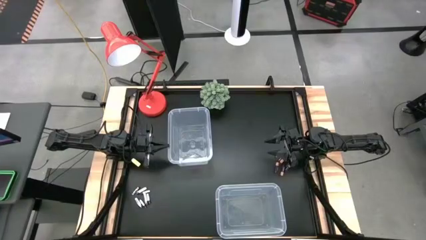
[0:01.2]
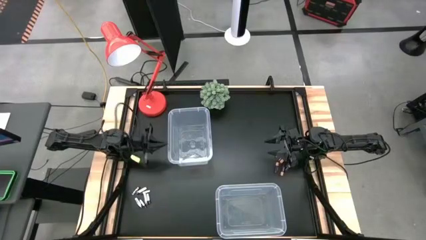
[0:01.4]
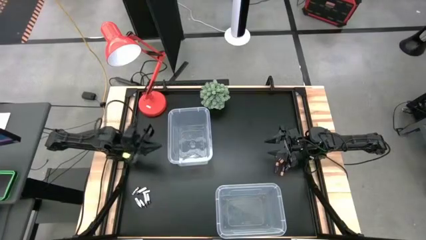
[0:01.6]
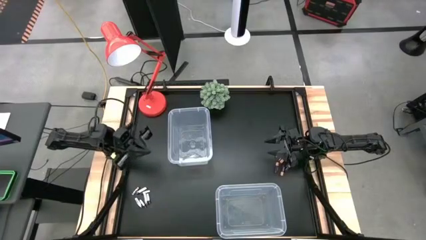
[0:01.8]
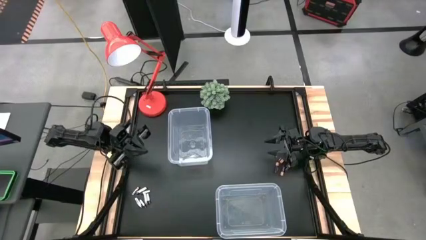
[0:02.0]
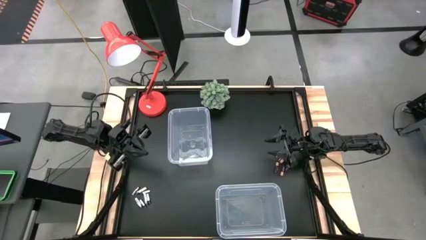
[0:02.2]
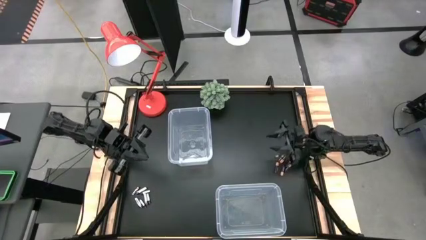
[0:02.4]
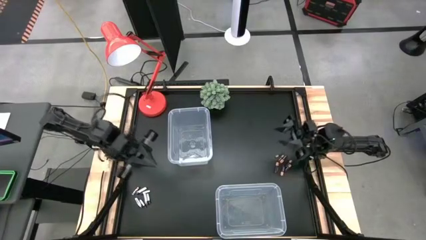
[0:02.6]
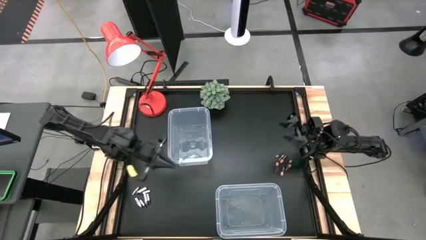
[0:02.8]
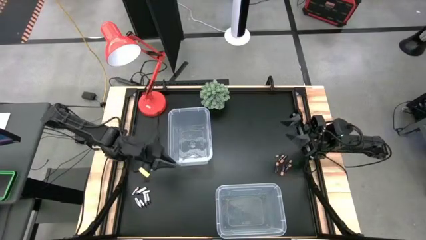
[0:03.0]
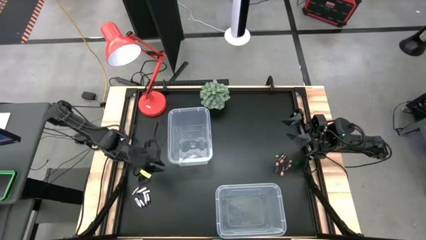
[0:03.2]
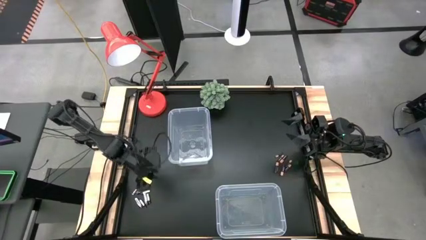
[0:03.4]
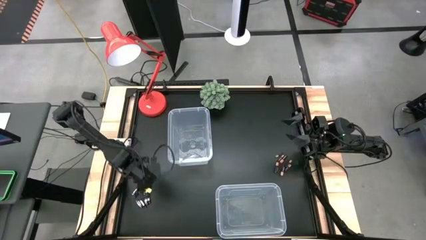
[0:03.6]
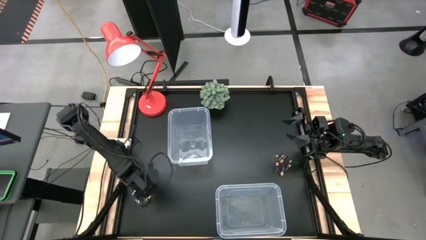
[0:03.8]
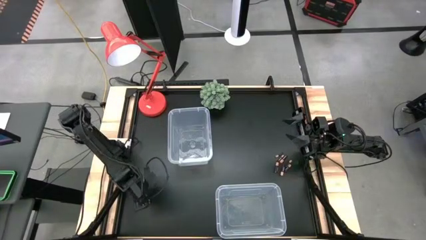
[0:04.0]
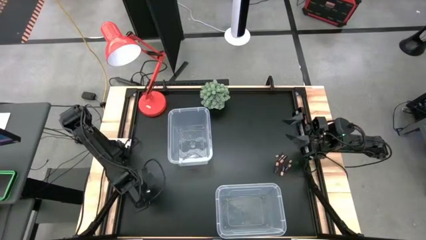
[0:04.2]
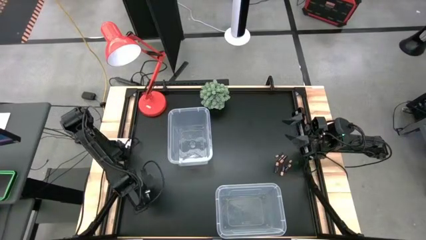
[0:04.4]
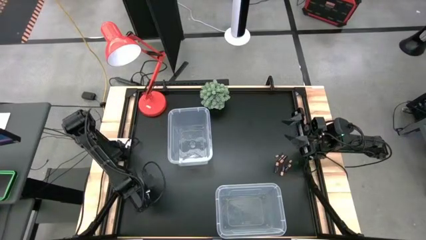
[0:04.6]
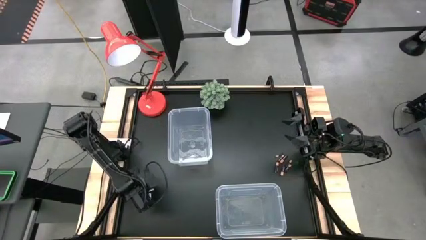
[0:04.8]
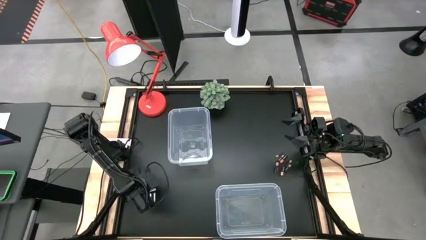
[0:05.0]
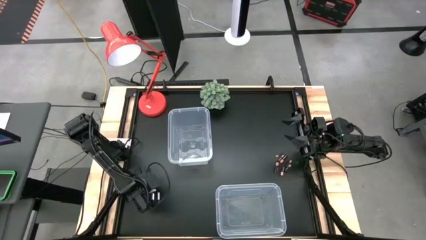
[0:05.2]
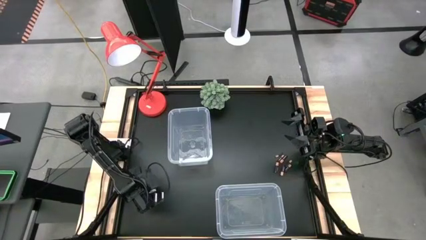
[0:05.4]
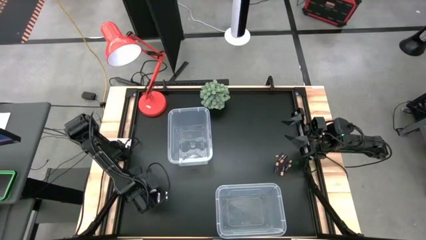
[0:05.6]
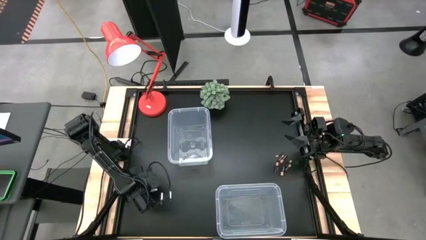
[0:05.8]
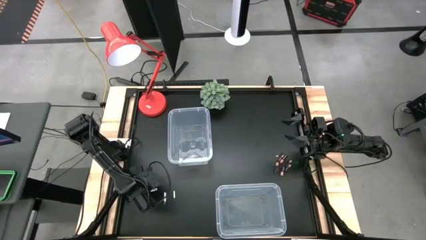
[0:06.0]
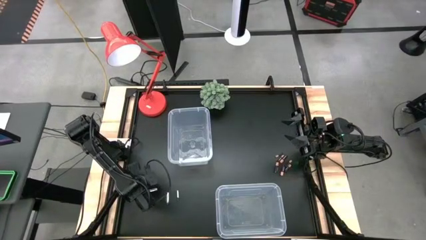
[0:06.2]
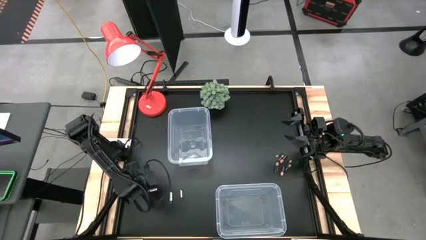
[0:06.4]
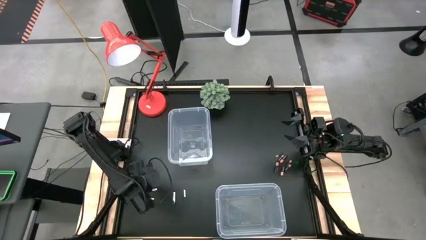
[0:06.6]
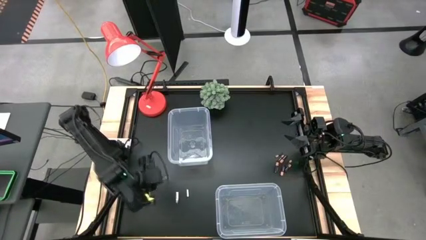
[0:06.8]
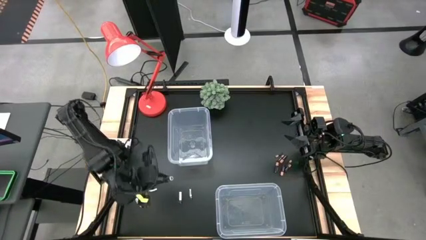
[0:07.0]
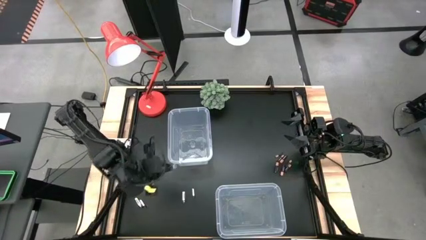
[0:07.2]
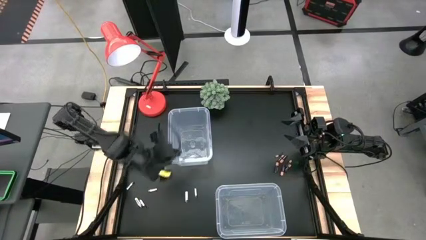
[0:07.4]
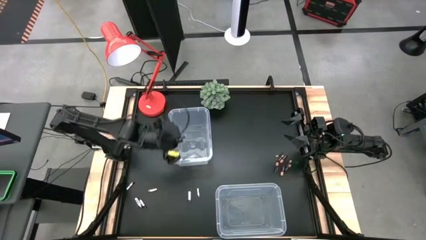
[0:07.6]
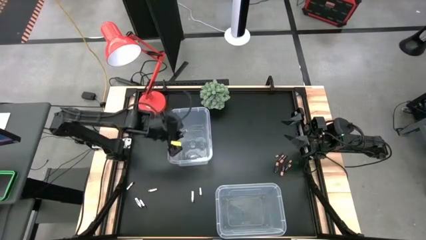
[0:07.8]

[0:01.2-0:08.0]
Task: Sort batteries
Put the silver battery into the top transparent bin

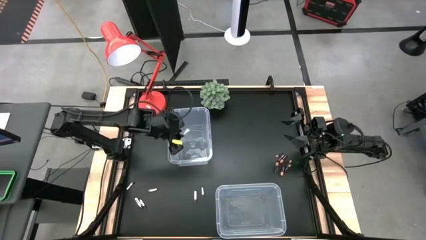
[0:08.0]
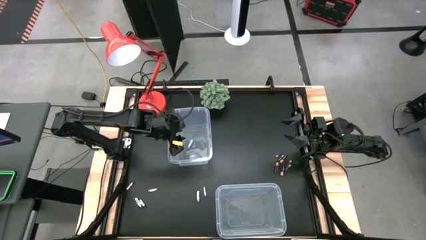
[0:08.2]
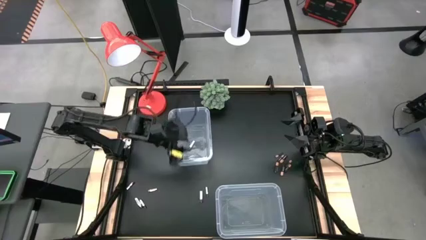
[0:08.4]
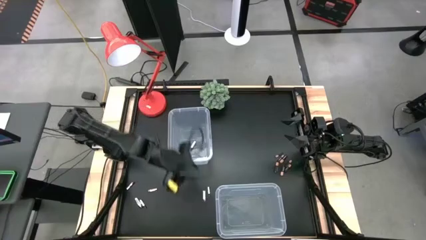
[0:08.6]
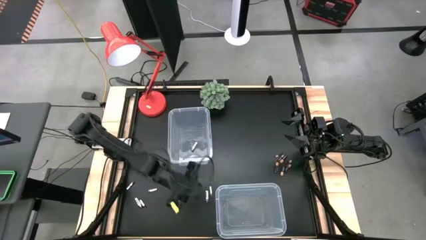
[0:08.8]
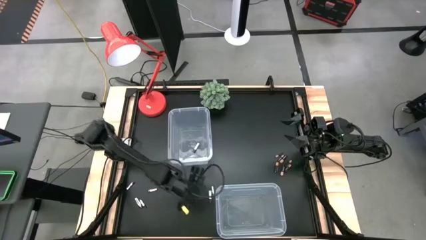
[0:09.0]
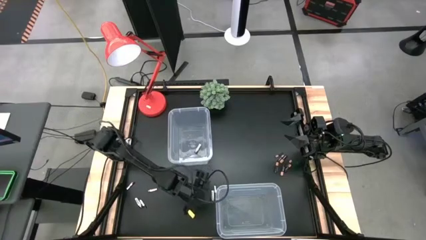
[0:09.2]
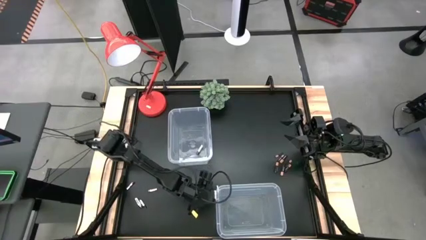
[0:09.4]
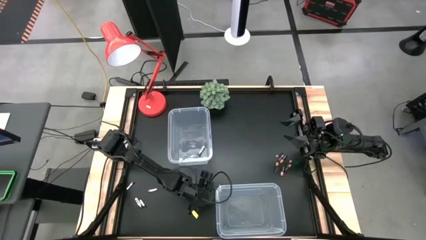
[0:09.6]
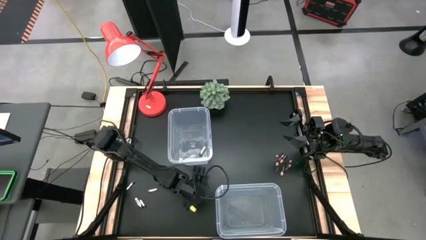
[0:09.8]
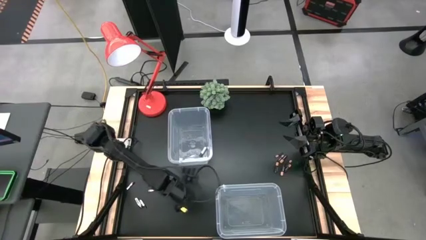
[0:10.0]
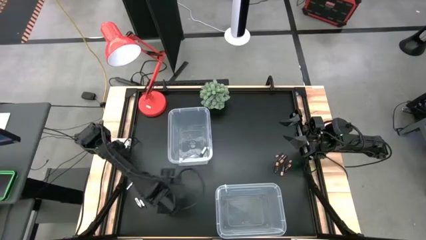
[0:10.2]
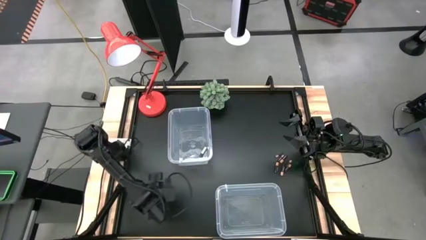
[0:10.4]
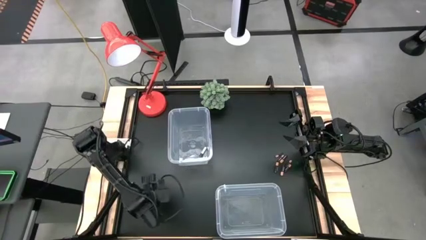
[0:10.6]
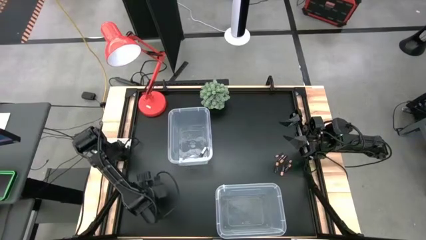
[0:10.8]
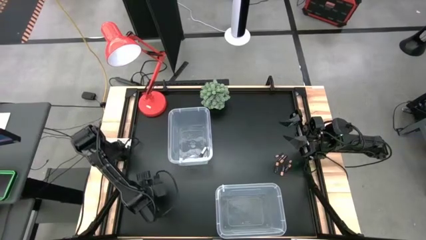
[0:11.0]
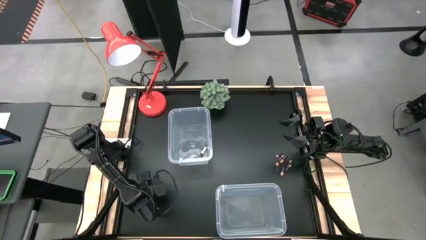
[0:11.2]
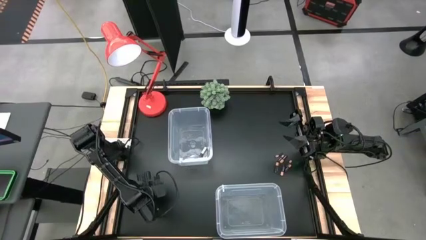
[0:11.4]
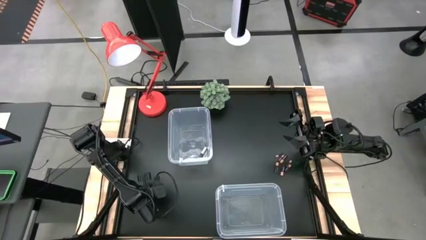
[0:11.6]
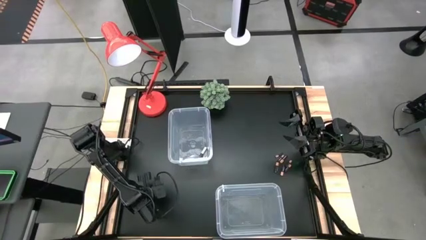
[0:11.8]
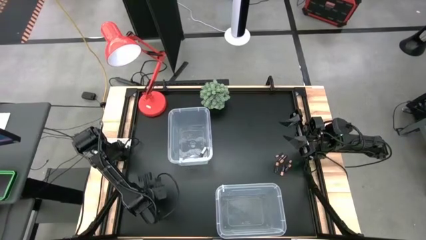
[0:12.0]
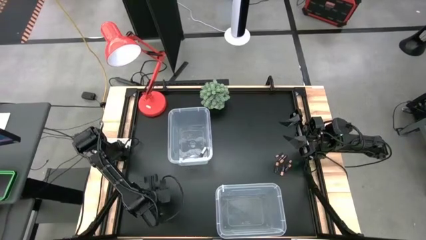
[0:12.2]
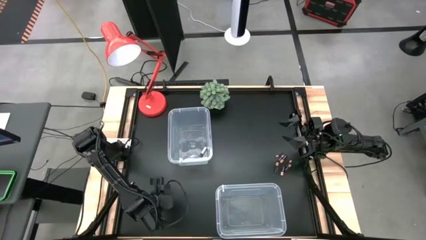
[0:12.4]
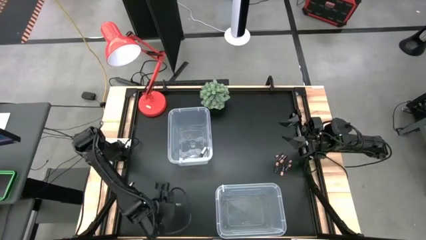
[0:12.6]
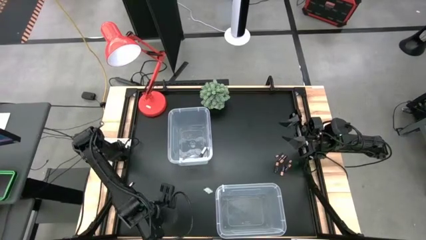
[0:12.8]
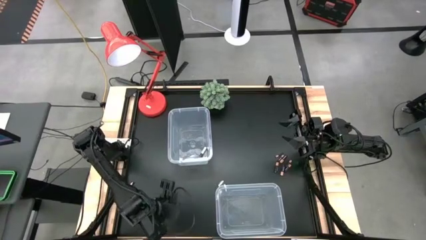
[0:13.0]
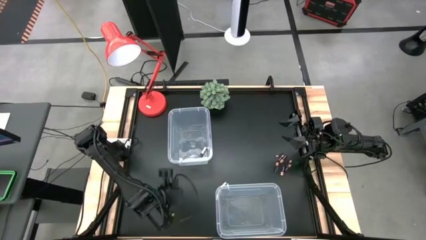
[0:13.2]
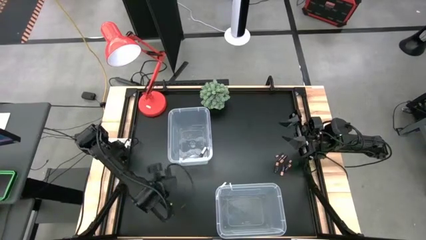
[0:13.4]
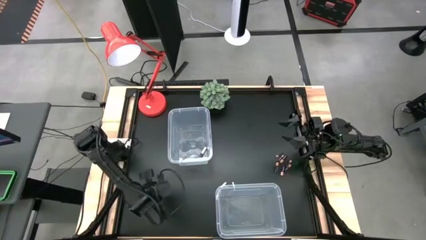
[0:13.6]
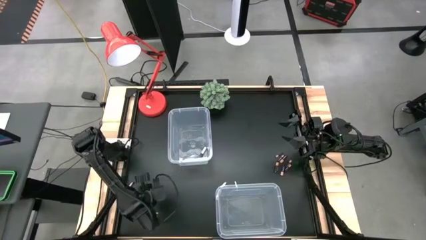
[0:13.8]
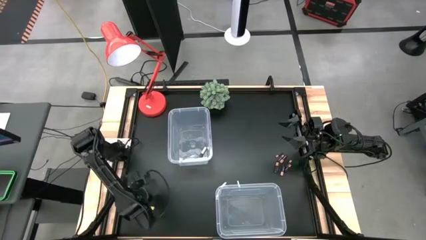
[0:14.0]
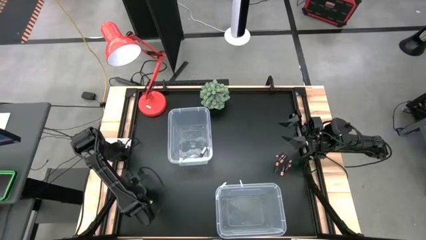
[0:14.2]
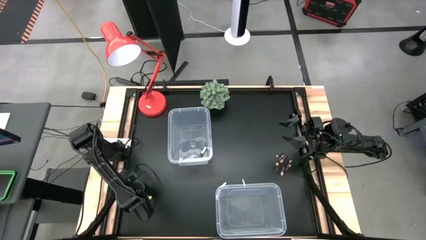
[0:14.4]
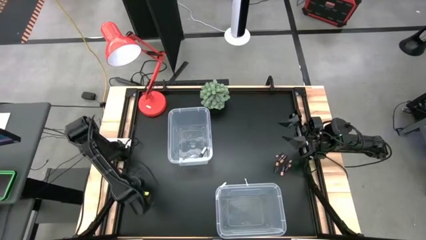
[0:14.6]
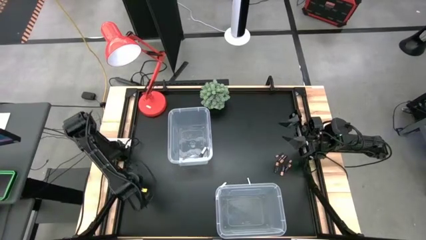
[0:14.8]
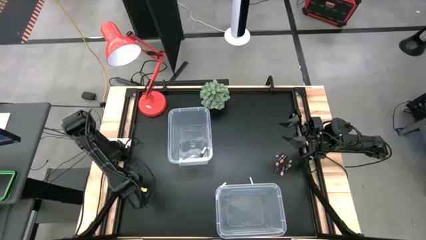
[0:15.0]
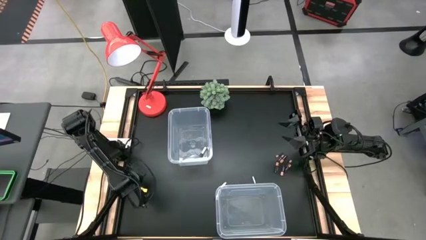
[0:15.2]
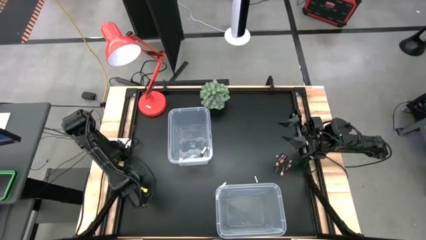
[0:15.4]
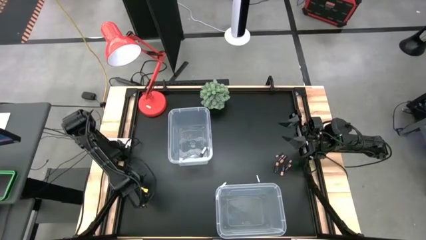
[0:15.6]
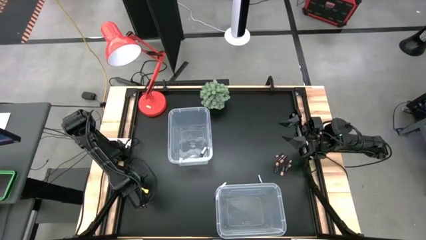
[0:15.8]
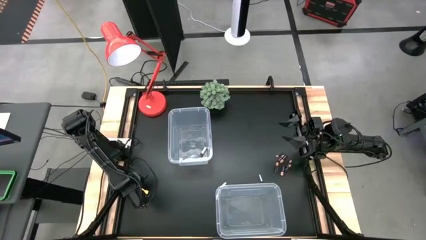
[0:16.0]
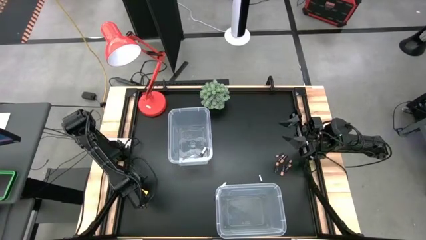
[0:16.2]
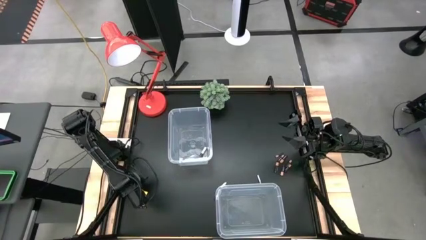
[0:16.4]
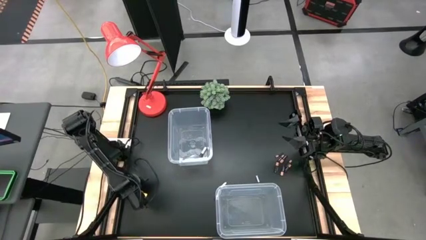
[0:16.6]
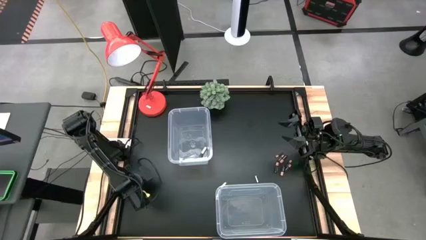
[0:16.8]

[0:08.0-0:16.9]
Put the silver battery into the top transparent bin

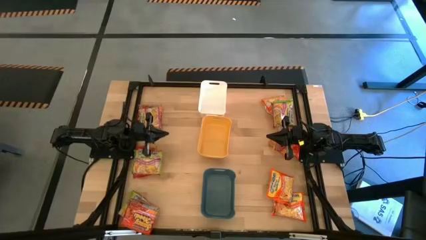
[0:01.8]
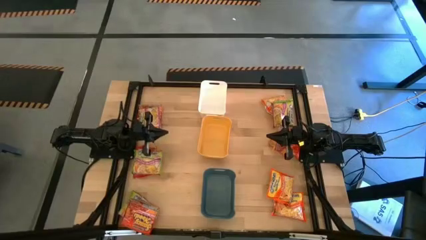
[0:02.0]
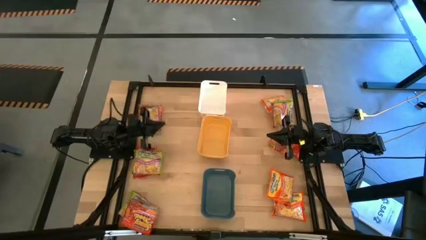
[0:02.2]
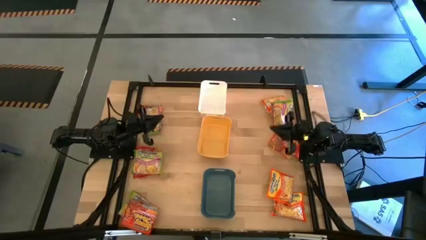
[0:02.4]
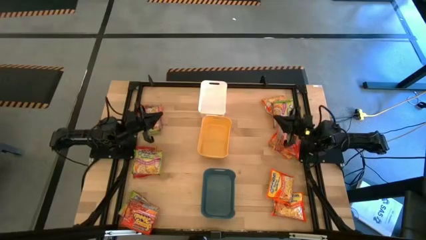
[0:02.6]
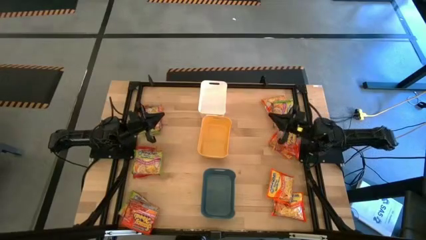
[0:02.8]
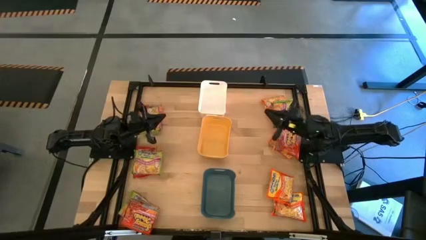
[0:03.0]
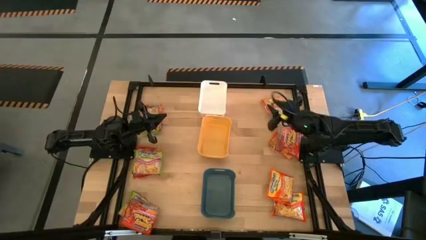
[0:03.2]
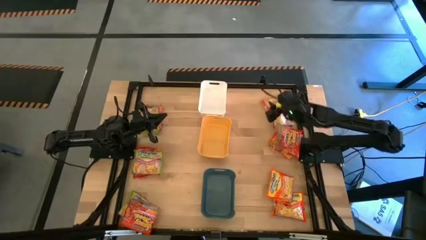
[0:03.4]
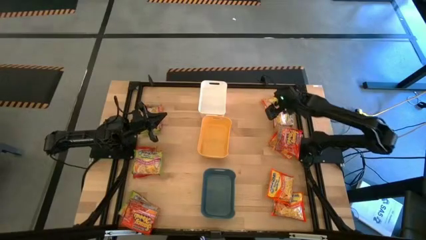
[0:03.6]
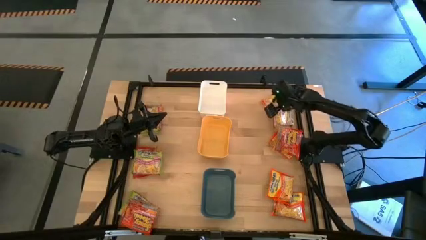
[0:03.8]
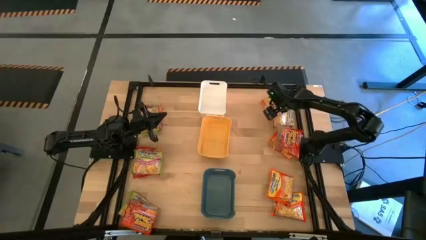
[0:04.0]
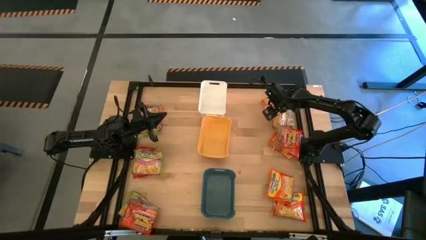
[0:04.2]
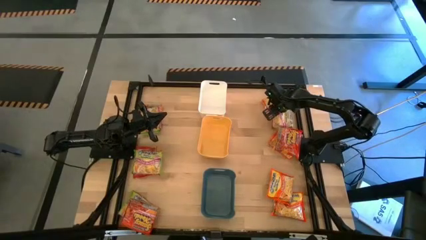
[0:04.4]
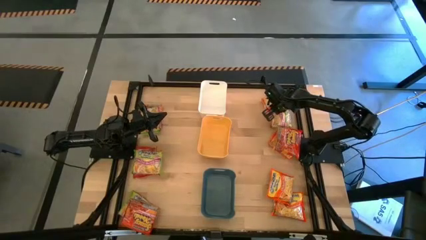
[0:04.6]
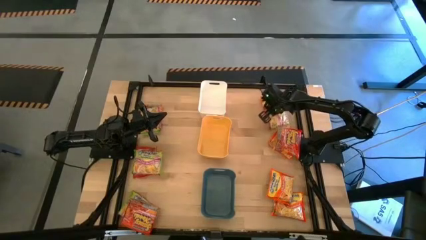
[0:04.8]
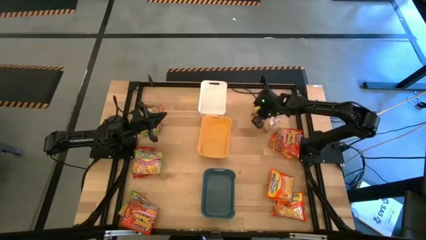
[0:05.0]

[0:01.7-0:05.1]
Task: Sort Maruchan noodles
Put the green noodle pack into the white bin
